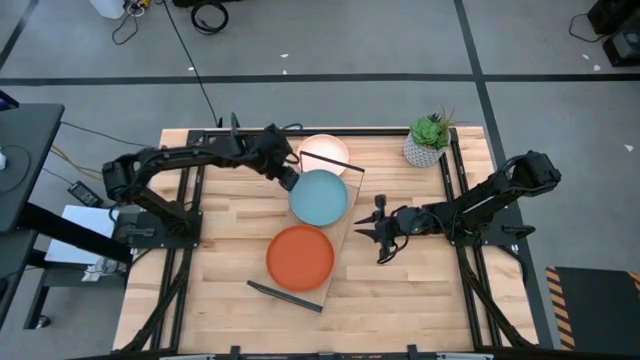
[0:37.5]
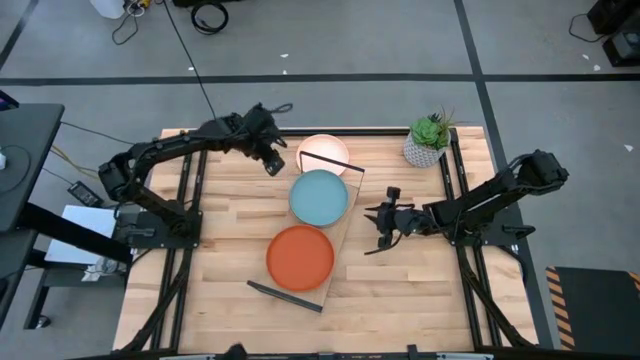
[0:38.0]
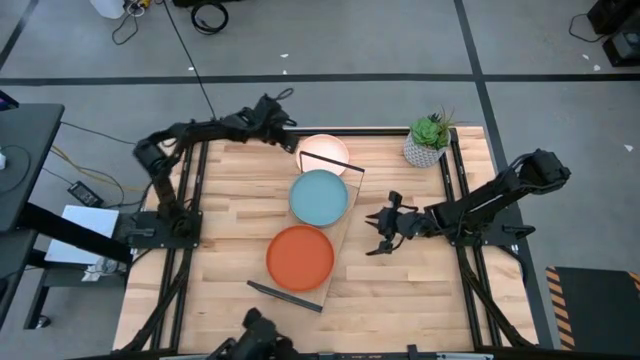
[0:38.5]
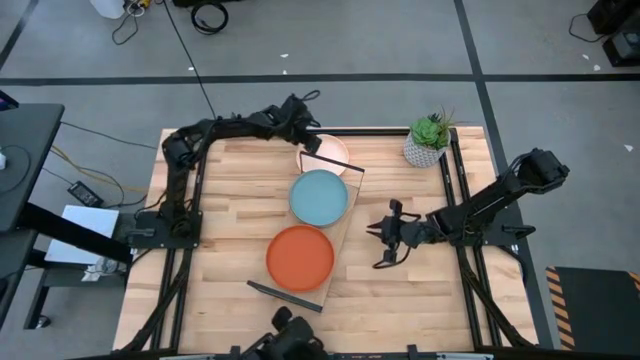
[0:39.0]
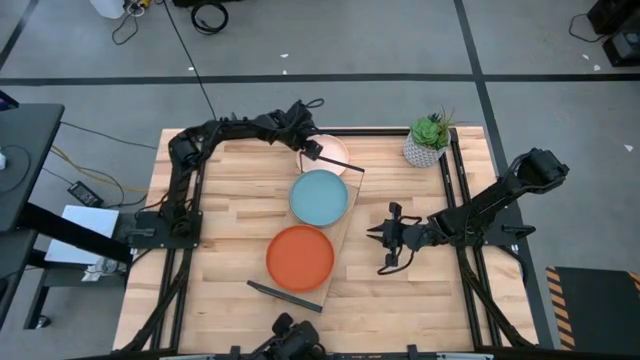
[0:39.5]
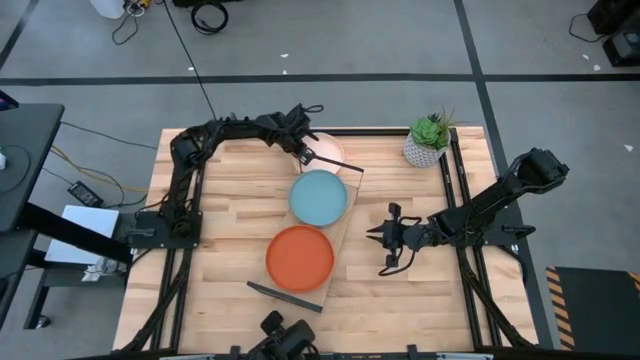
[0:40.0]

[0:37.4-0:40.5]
Task: Place and stack plates onto a shelf
Stack the light orange plate on top of the light blue plate on the shelf

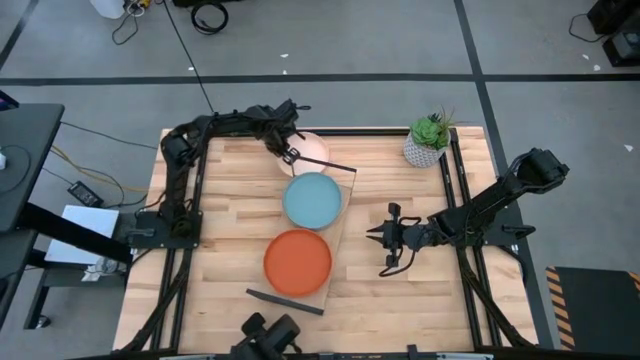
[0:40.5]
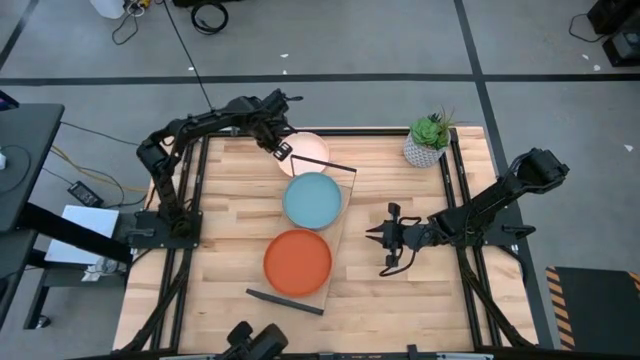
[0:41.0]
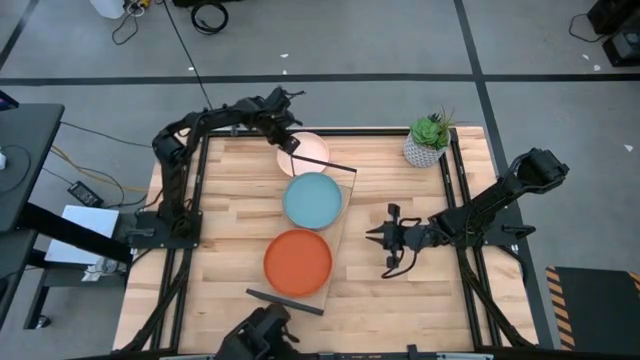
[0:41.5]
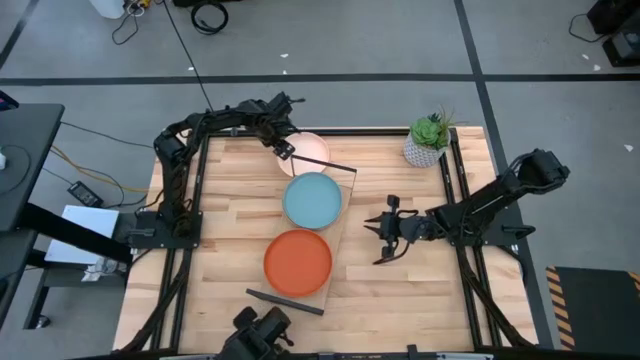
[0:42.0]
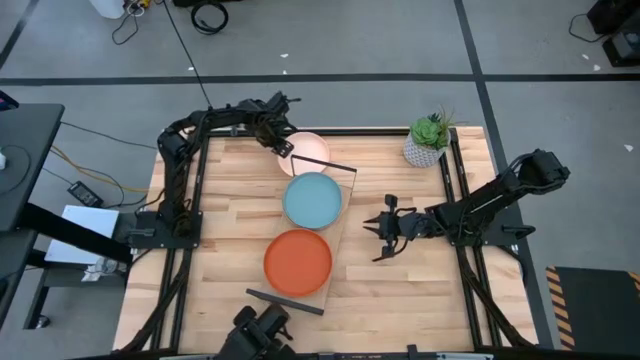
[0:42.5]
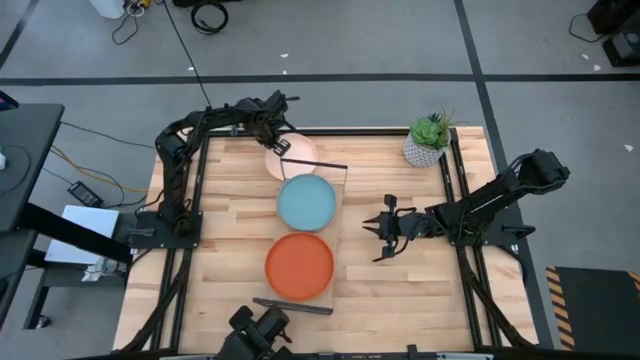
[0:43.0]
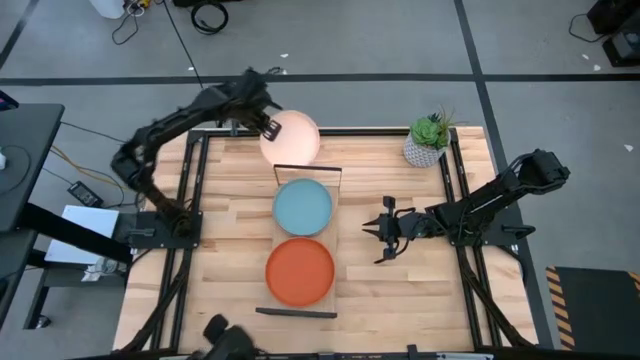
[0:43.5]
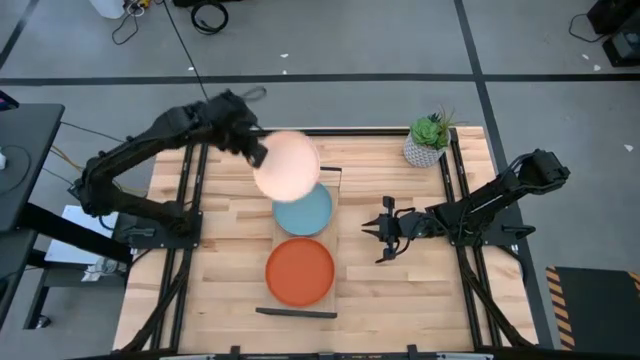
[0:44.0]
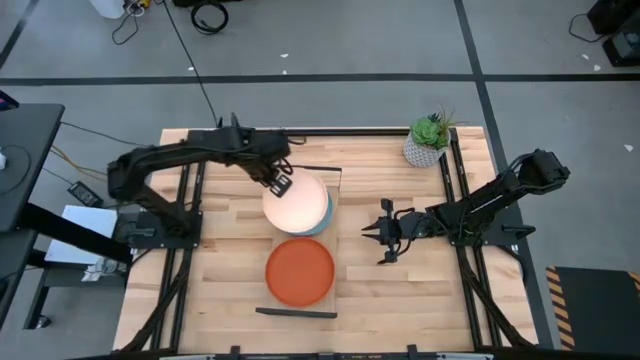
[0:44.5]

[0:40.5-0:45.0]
Stack the light orange plate on top of the light blue plate on the shelf

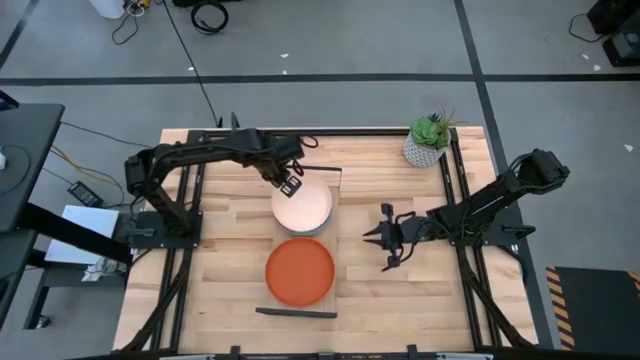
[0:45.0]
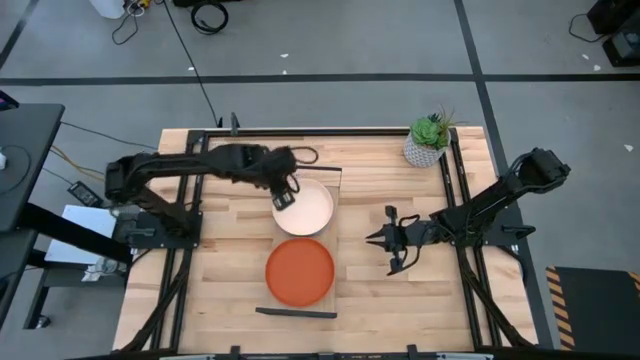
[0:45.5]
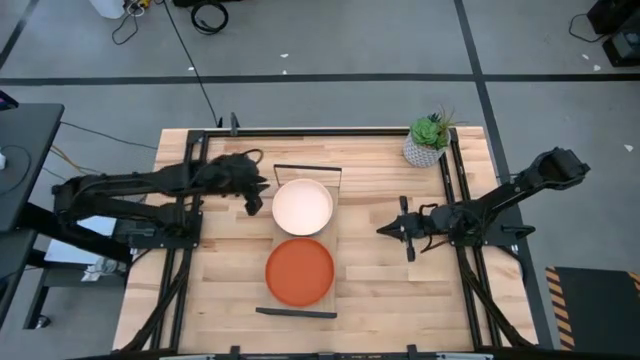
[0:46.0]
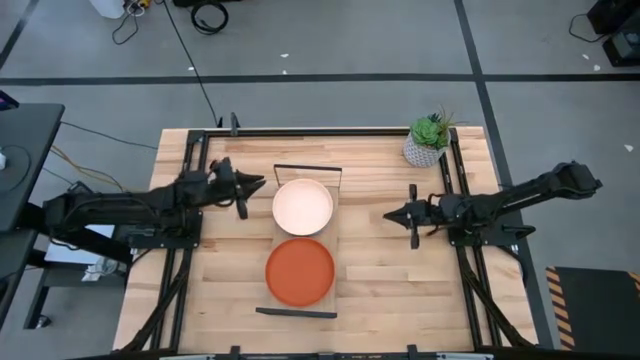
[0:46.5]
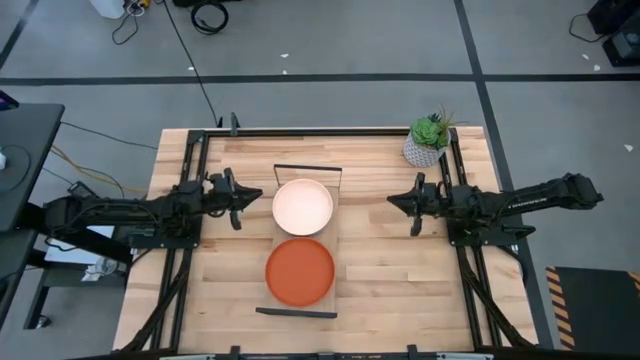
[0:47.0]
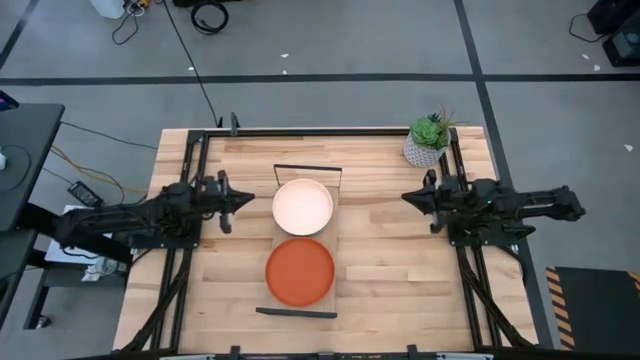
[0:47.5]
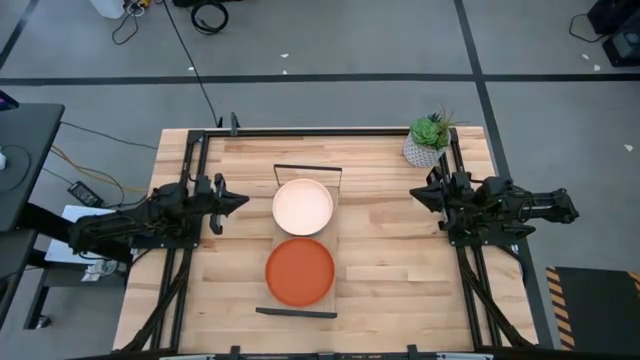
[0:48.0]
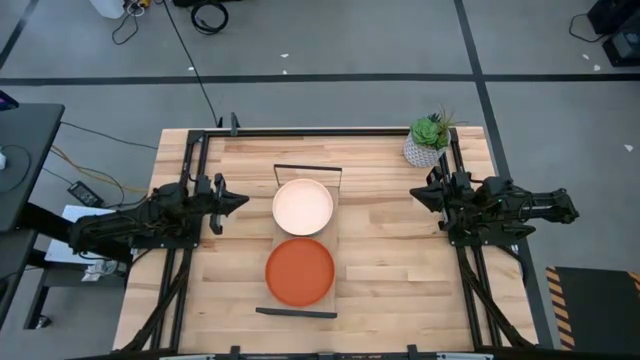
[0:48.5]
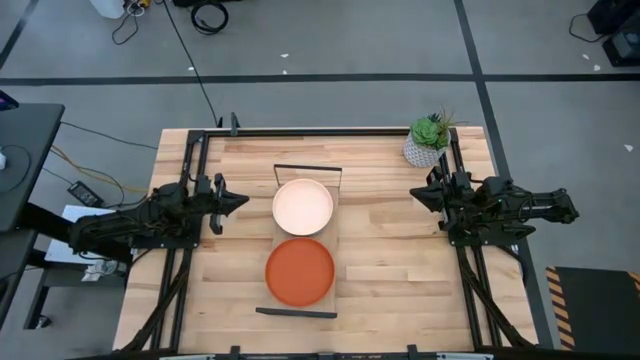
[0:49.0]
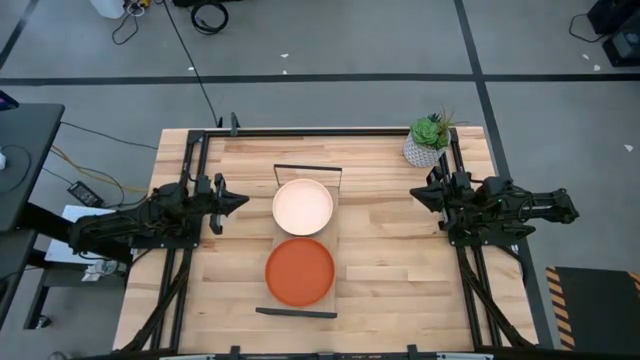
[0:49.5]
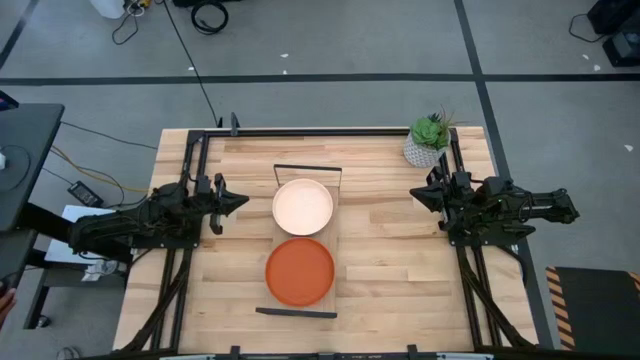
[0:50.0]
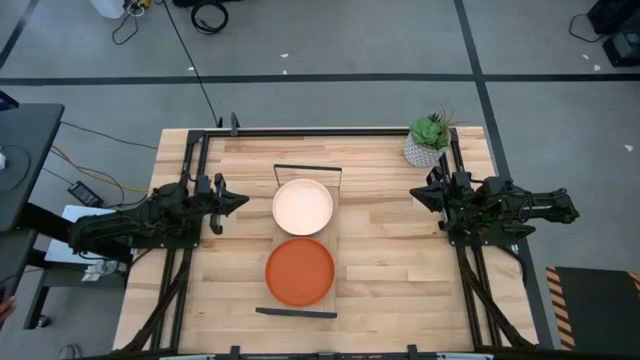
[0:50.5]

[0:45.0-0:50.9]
Return to Home Position

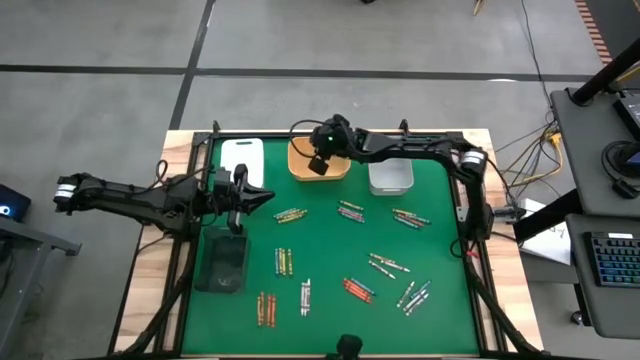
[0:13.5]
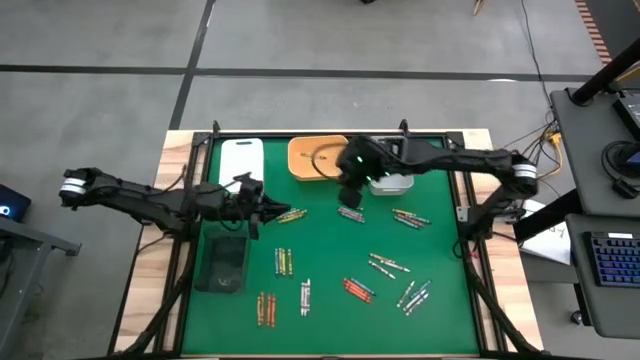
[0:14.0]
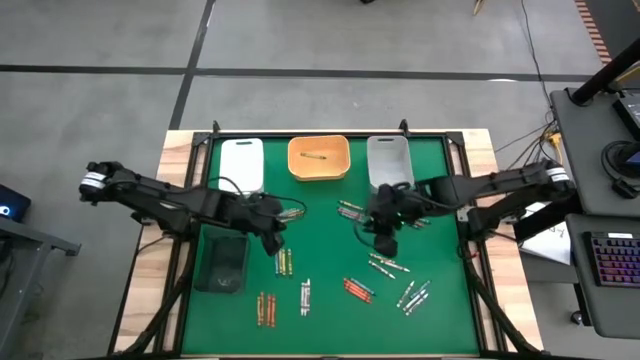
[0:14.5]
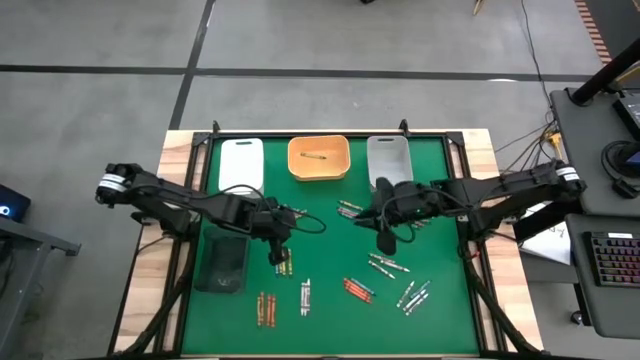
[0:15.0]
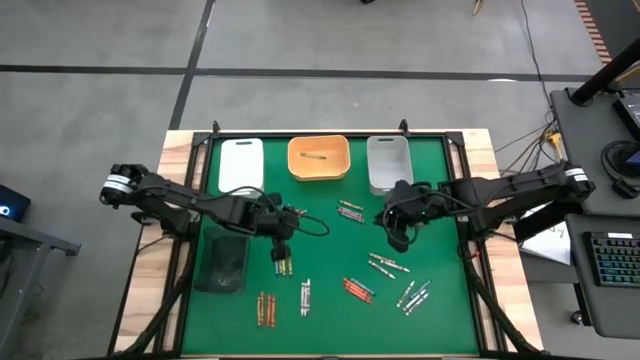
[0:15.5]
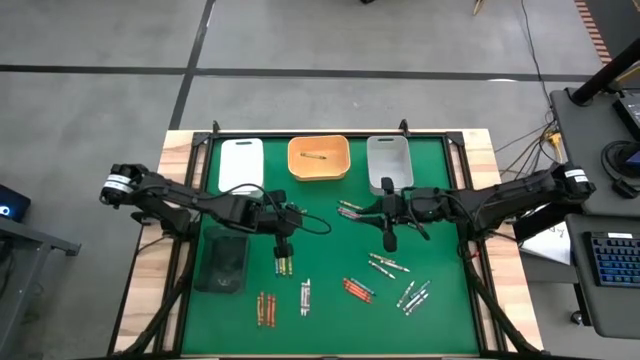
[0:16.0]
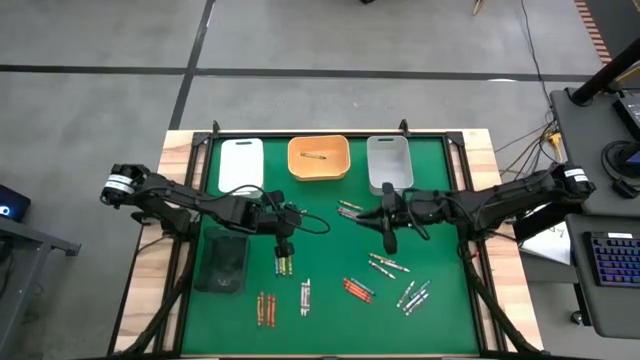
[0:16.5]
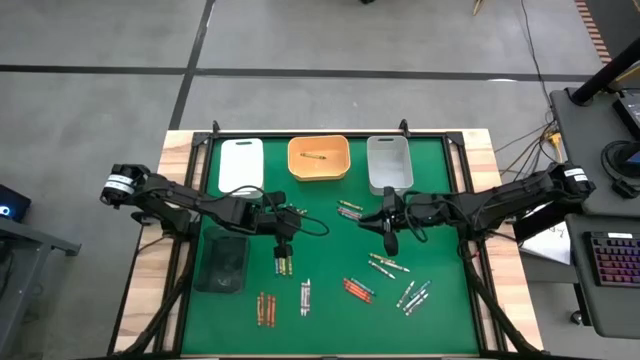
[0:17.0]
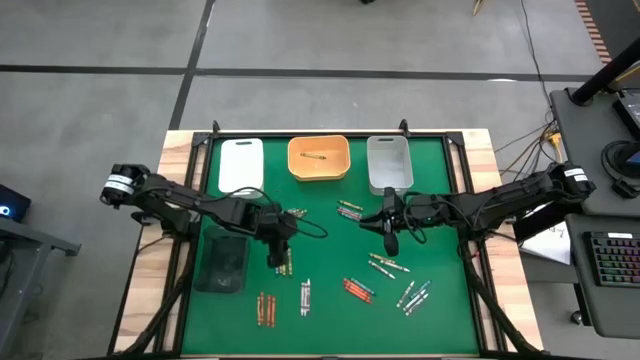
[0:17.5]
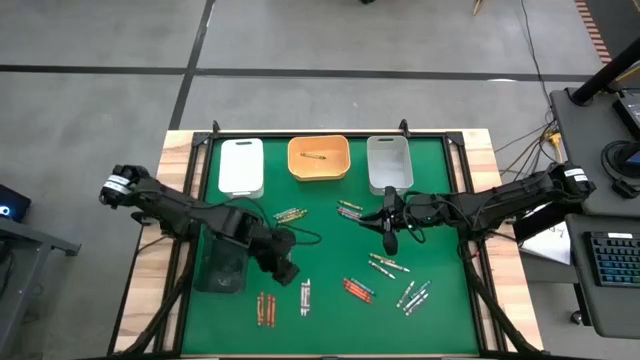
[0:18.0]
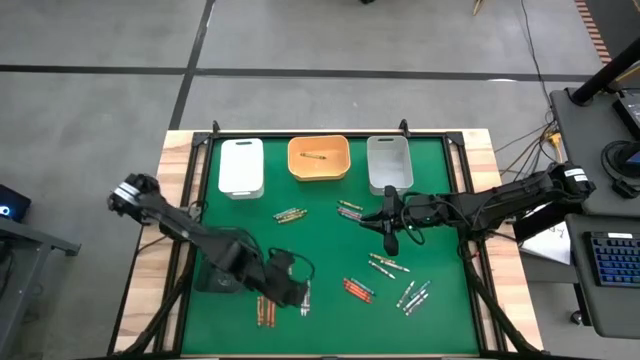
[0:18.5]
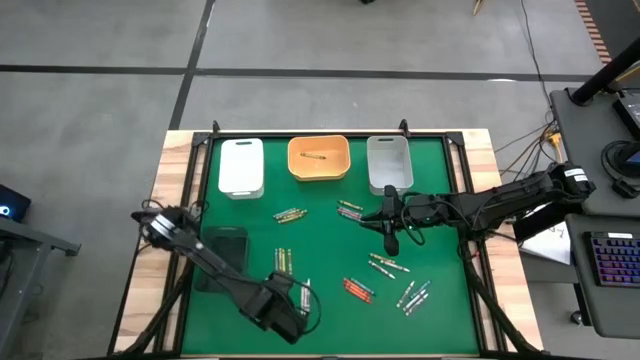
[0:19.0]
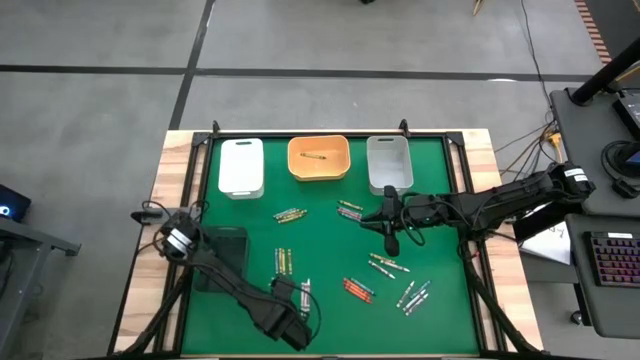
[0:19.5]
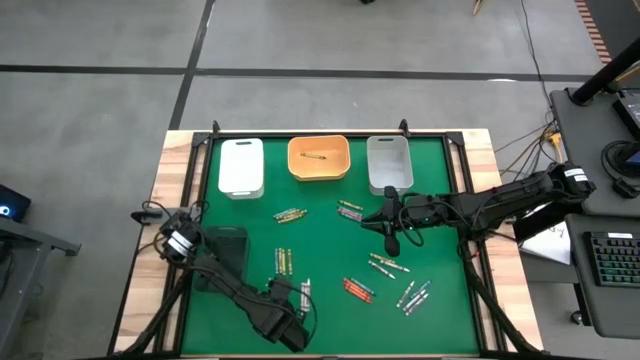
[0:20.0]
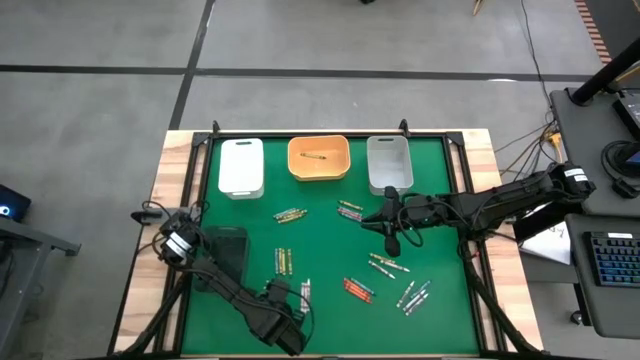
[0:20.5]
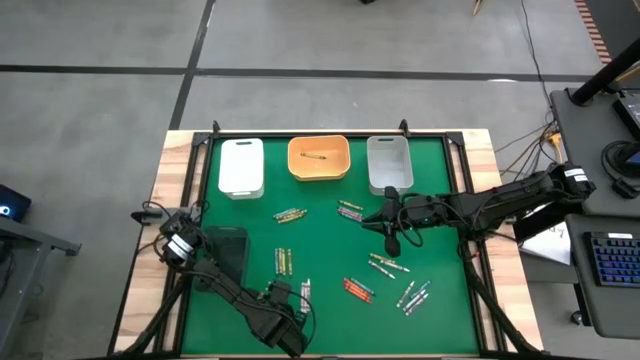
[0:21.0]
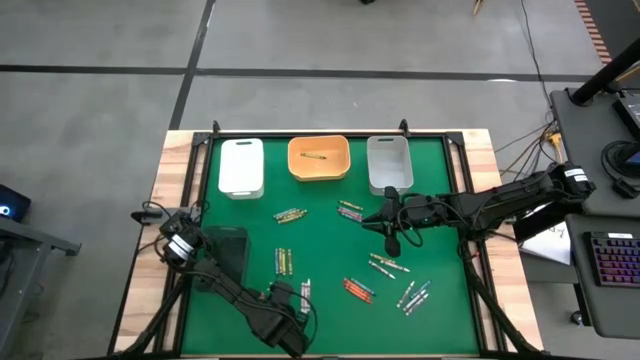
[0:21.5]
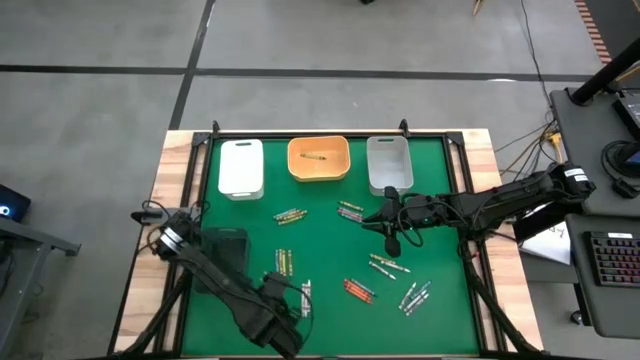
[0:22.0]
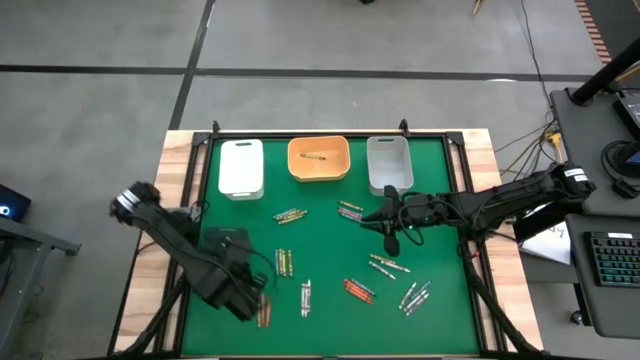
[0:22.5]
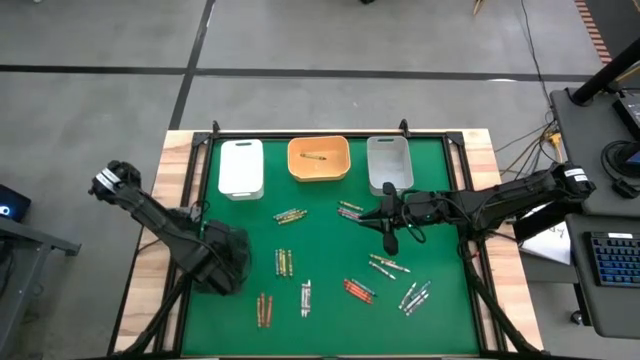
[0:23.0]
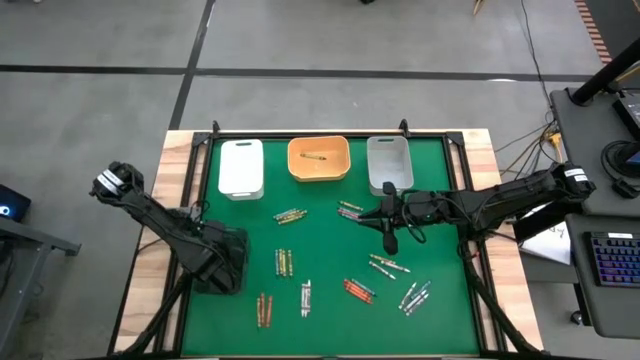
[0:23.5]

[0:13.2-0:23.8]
Task: Sort crayons
Put the orange crayon into the black bin
